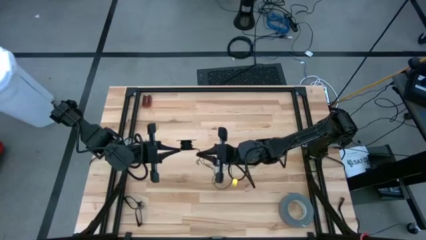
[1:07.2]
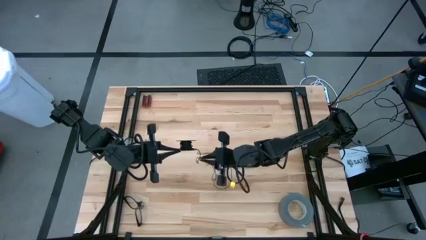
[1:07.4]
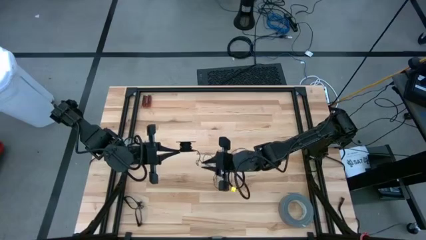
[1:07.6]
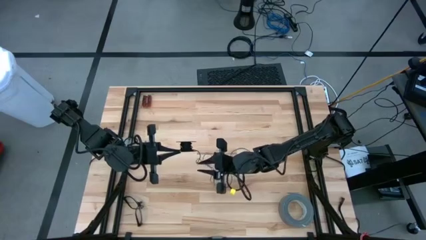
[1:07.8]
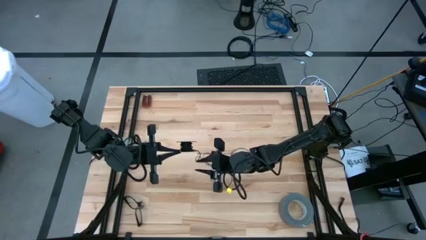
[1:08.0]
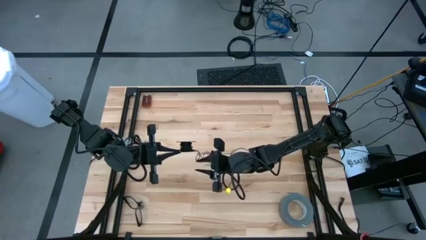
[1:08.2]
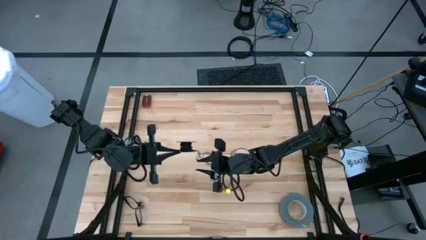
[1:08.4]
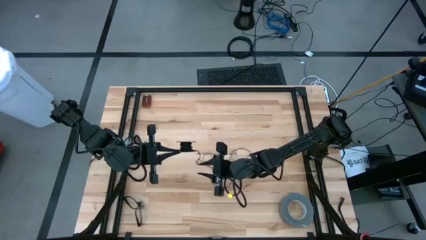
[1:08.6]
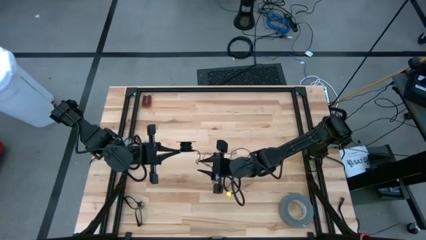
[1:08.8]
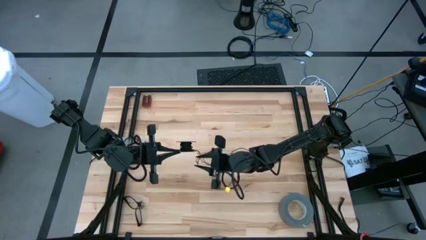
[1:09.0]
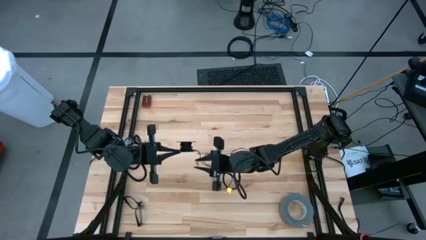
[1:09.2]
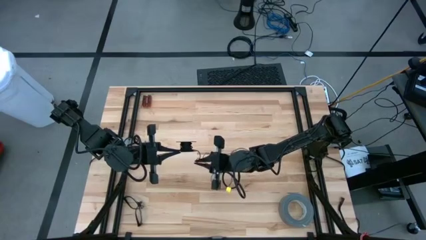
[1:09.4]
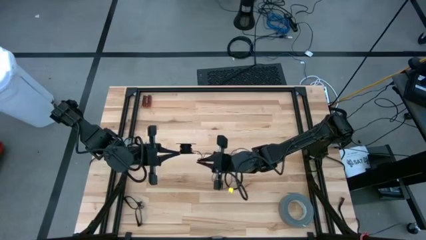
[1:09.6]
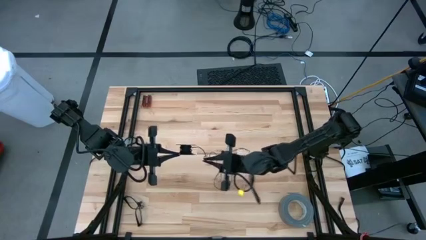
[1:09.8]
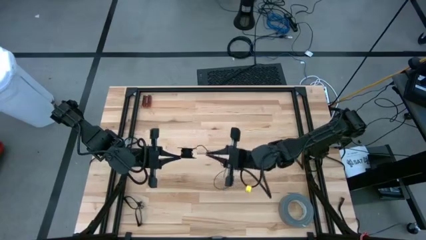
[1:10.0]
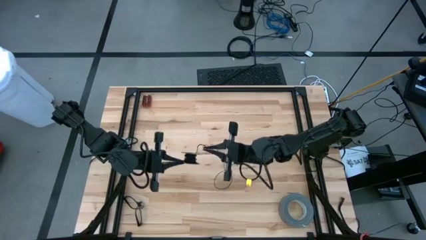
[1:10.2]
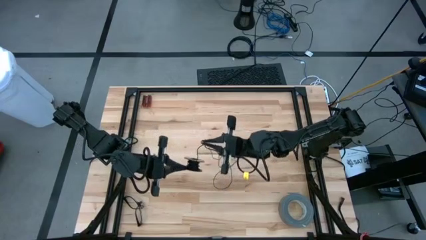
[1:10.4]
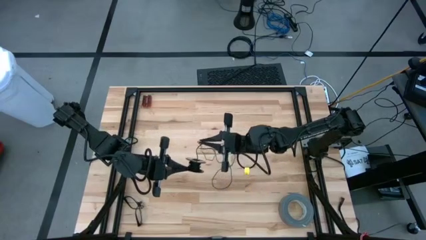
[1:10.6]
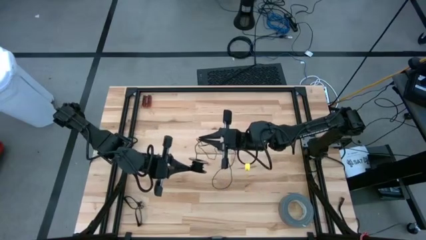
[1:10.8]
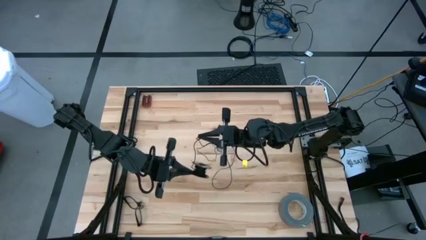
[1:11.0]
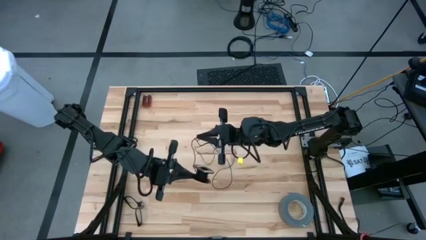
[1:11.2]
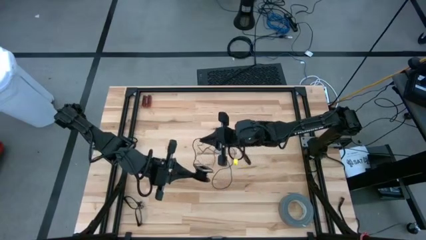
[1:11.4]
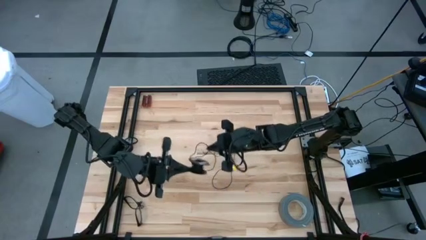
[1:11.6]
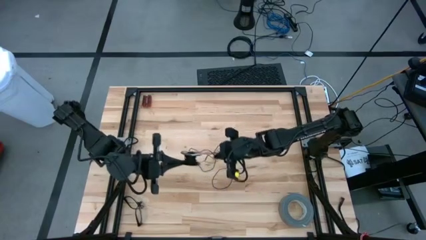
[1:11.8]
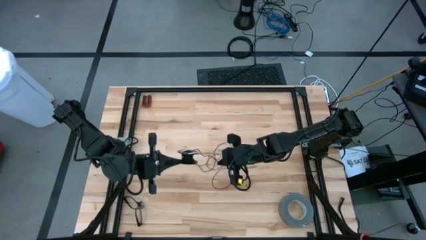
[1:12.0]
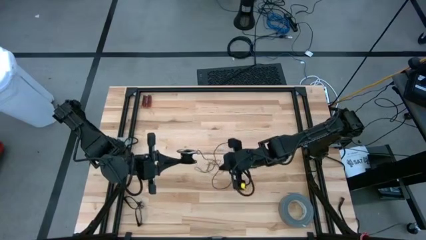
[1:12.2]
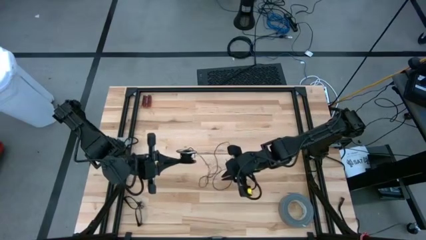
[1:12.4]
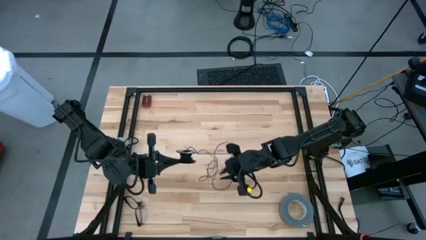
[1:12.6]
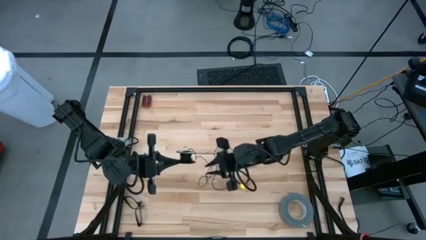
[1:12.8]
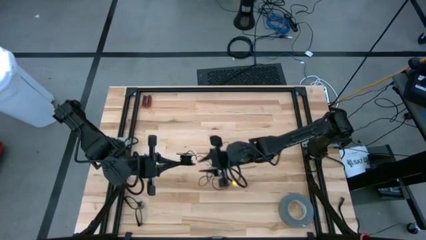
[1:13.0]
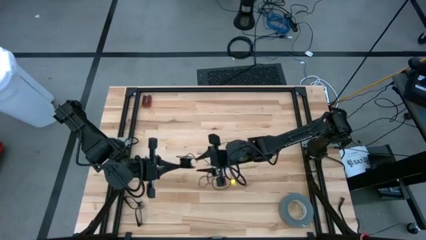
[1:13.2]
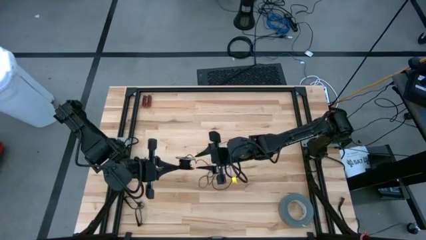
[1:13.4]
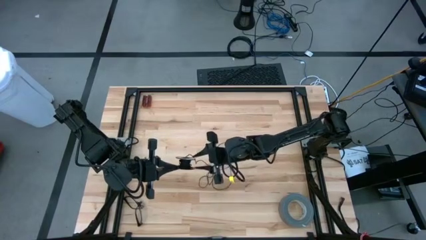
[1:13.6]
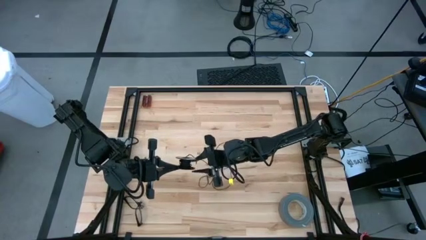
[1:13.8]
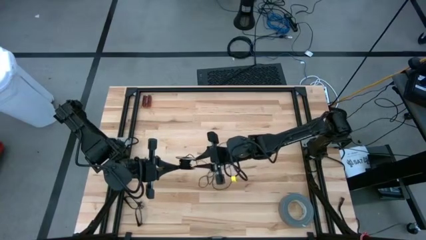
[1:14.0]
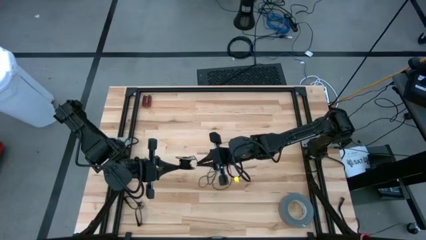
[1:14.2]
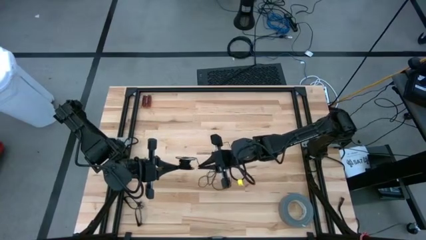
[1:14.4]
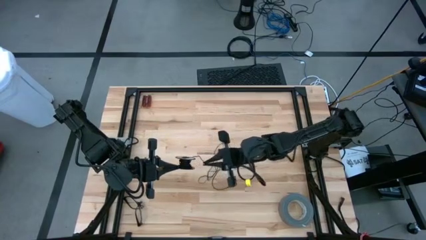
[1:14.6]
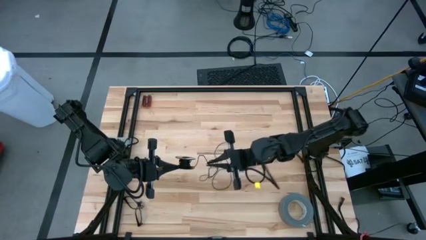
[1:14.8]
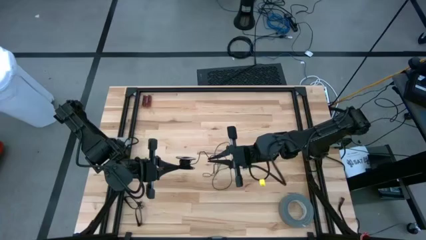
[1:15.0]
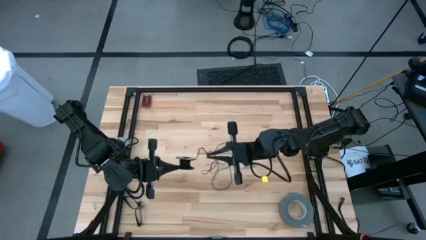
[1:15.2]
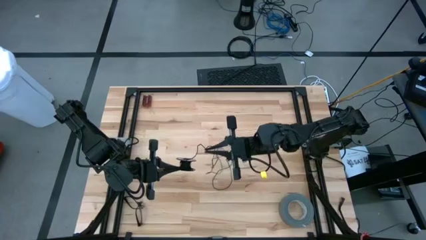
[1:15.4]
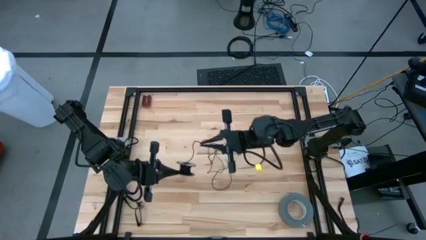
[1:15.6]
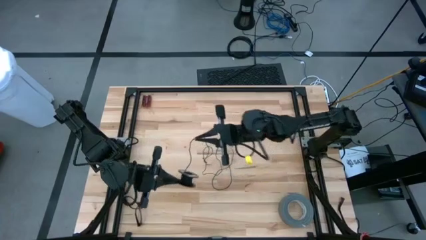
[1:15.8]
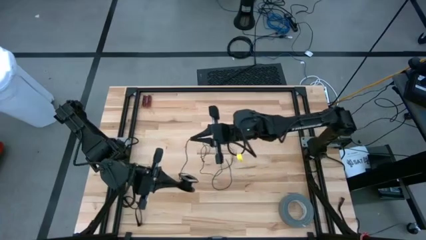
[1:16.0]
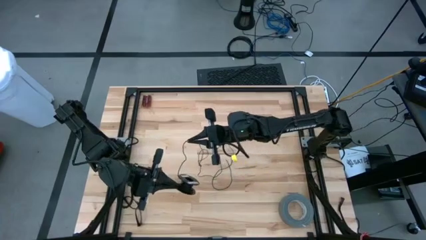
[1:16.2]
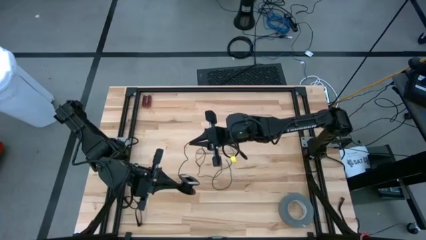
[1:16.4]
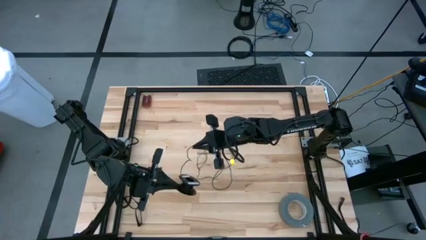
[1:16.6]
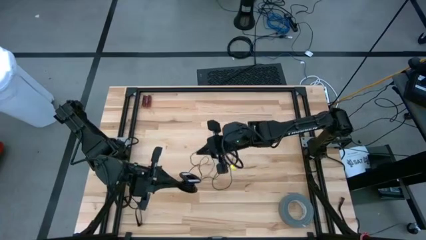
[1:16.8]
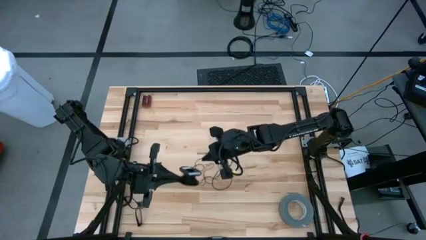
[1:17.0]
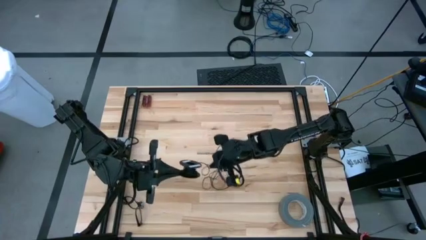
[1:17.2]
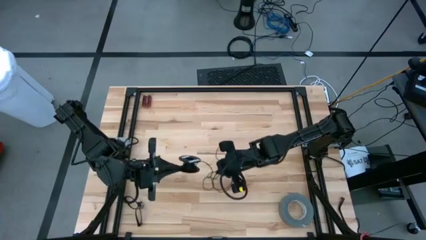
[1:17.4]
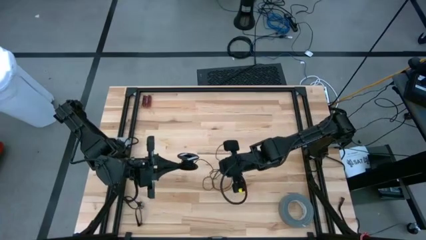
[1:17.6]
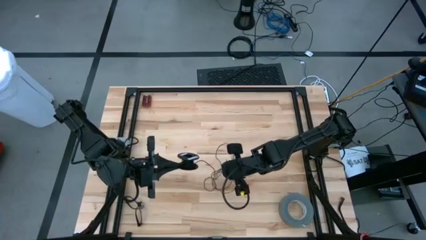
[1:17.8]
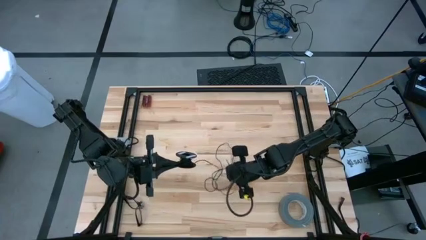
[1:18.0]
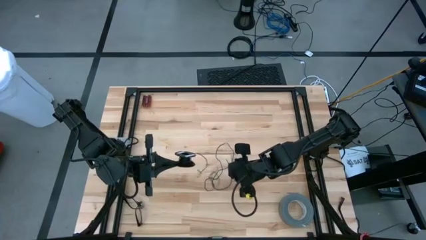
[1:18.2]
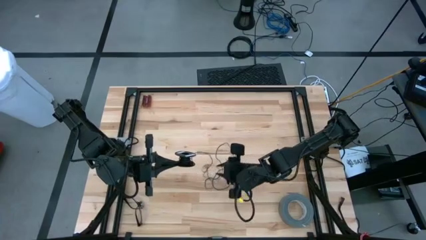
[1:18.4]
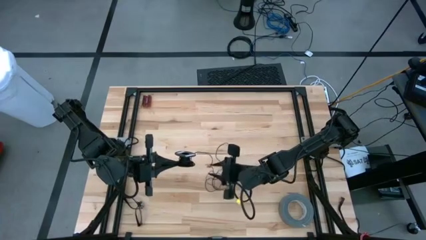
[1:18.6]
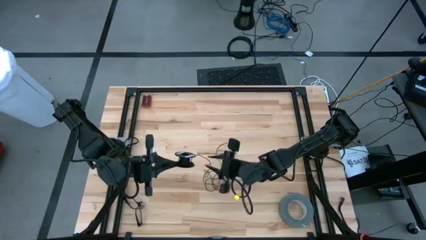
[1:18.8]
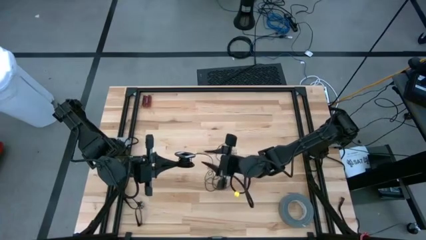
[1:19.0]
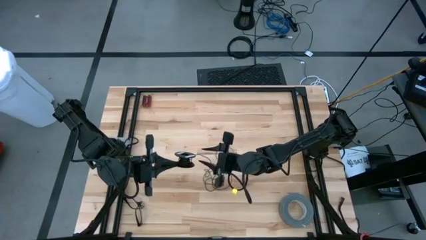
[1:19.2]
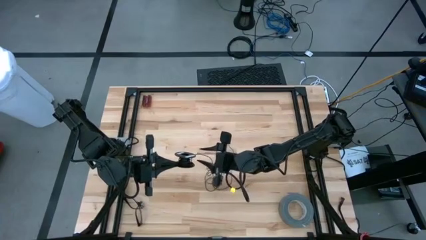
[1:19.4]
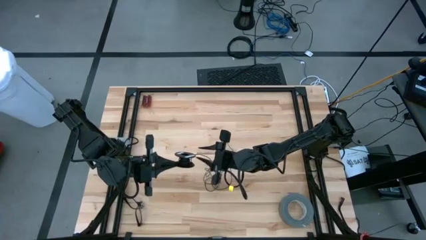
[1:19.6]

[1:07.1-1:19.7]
Task: Coil cords
Uncoil the black wire from the spool

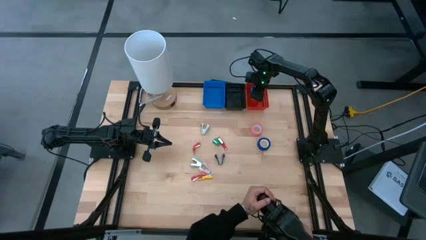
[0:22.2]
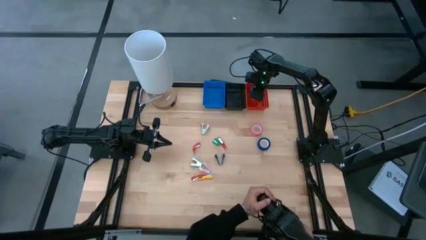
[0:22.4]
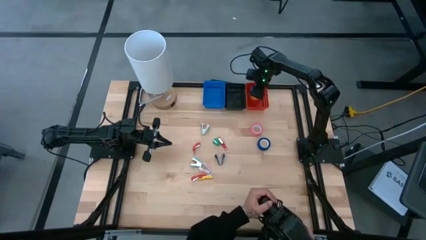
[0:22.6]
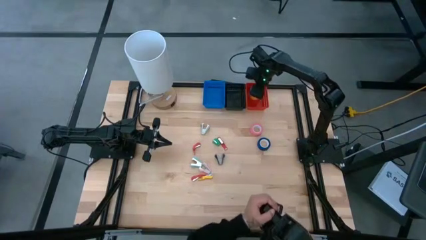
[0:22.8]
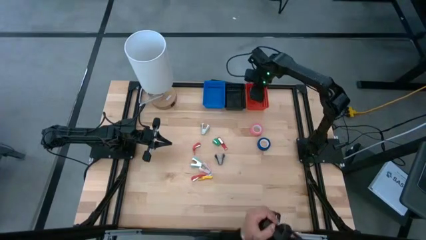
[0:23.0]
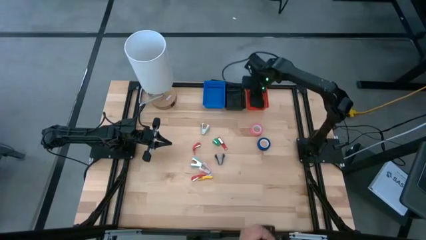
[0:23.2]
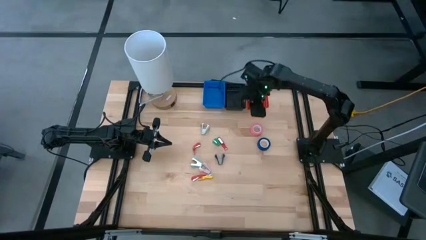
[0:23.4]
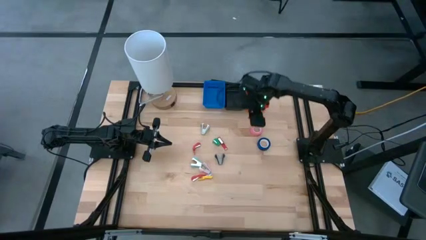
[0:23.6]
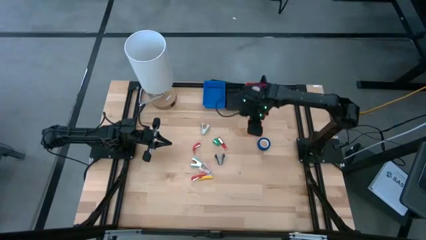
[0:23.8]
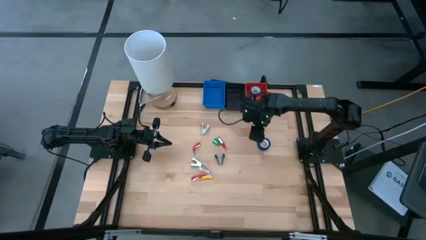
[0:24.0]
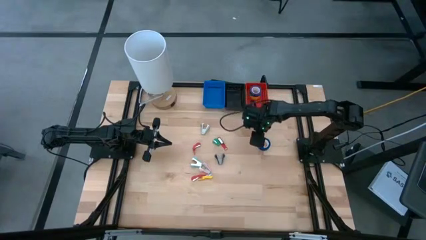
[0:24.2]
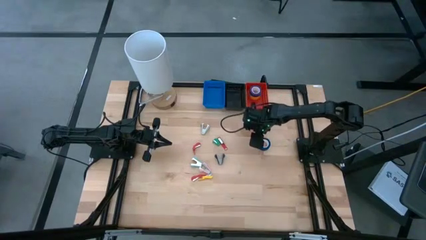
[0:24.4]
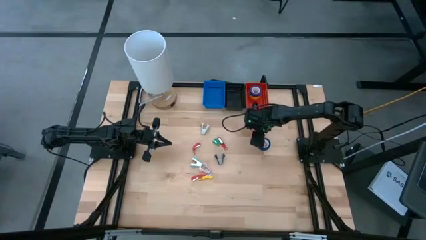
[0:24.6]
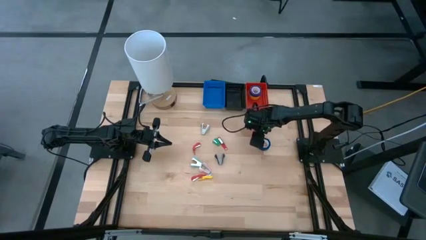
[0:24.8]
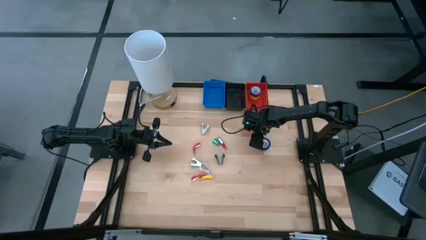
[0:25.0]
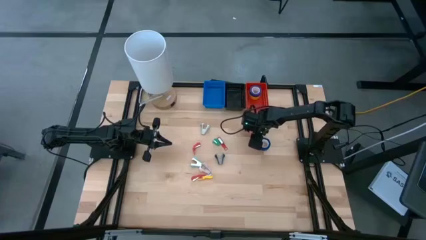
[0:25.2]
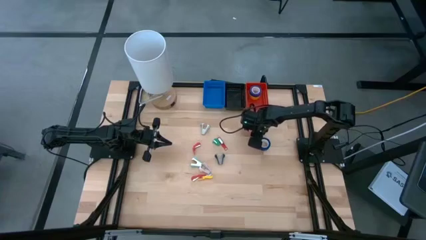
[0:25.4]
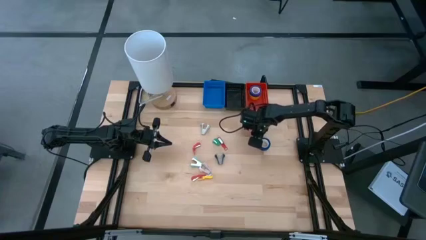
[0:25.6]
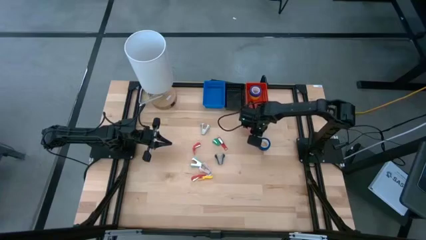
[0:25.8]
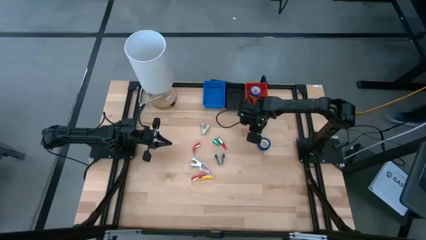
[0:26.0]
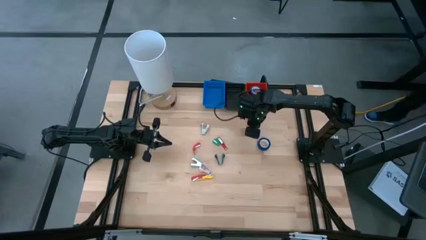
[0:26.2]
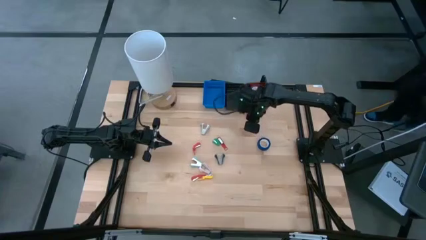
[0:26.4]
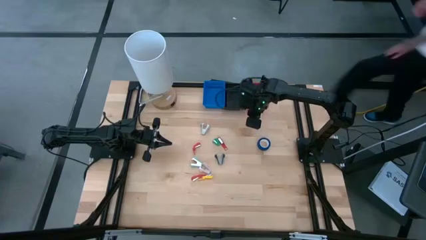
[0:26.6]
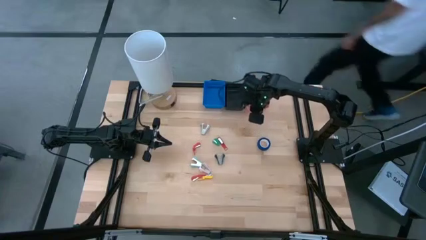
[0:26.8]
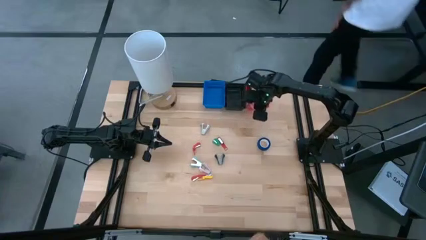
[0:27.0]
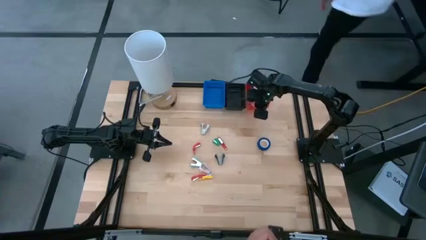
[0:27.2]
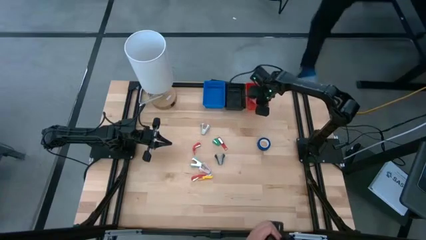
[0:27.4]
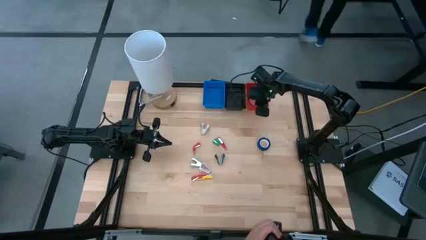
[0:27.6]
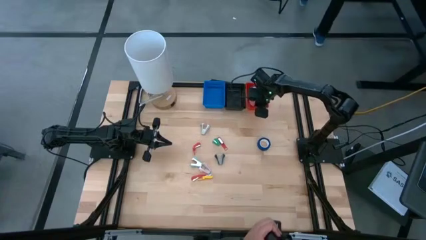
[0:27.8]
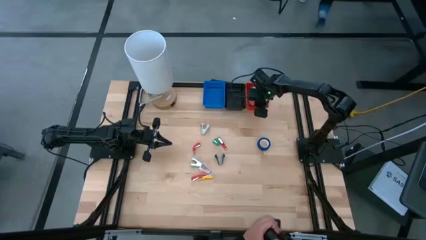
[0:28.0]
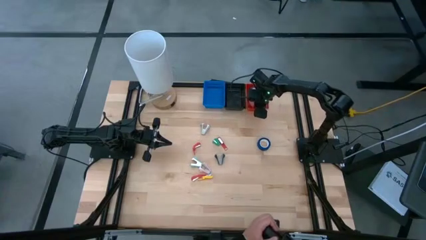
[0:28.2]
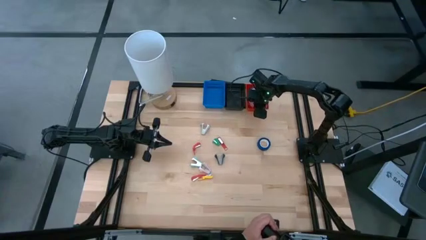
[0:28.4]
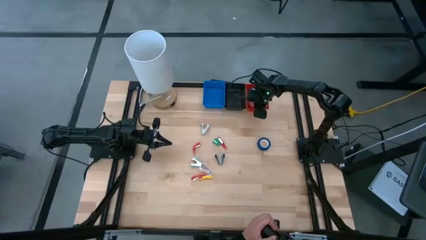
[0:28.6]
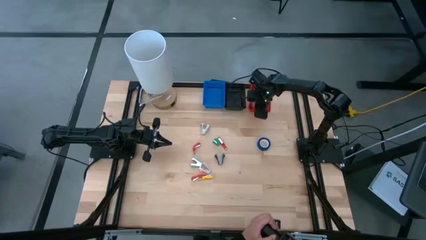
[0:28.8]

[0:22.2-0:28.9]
Task: Pick and place Stapler, Stapler remover, tape
Put the pink tape into the red bin
